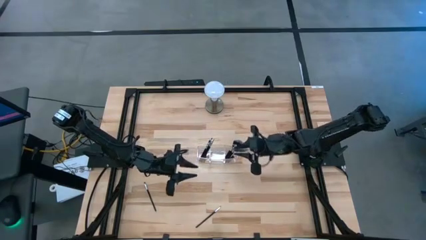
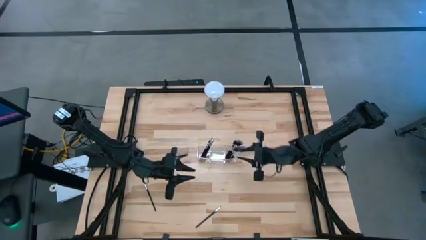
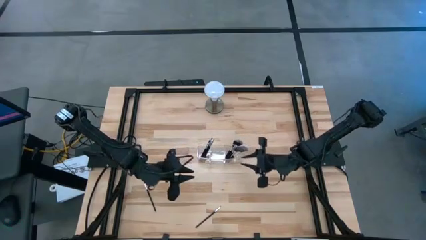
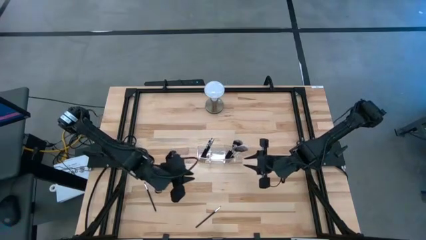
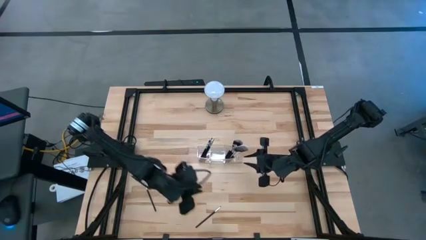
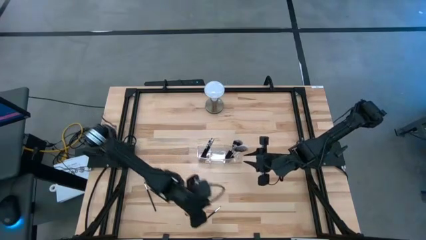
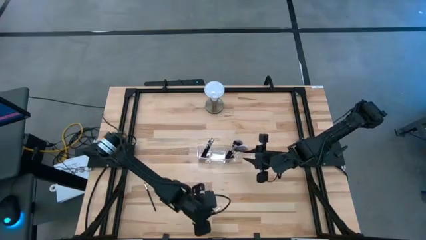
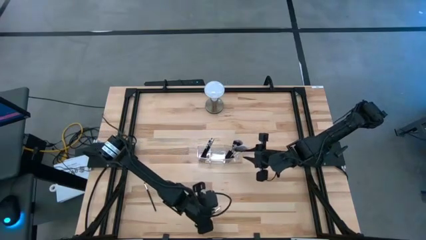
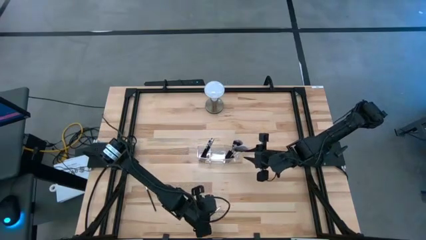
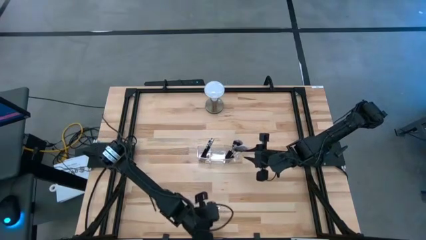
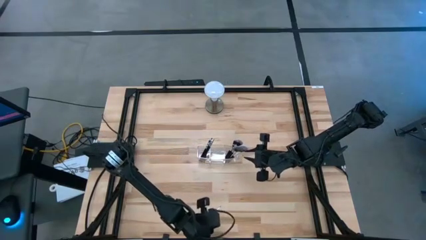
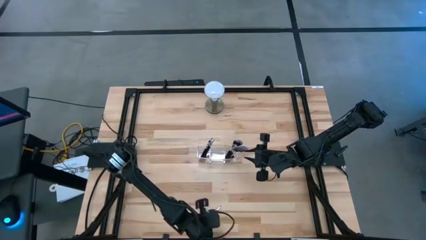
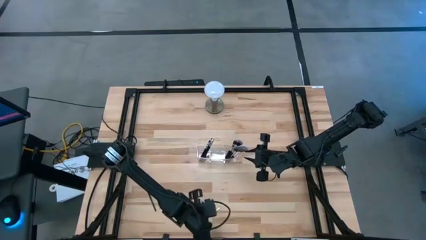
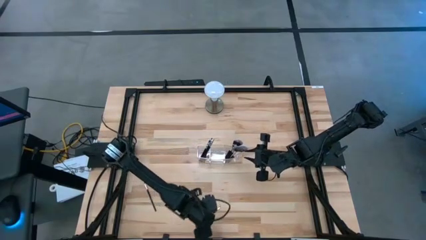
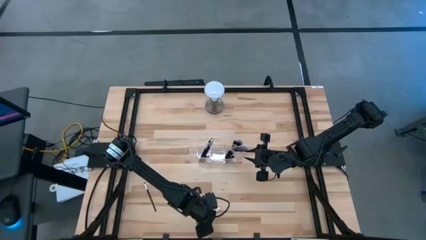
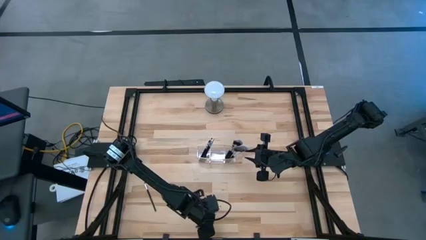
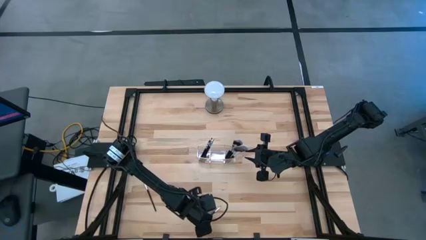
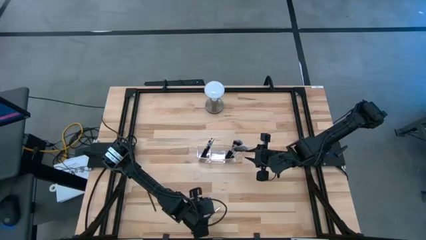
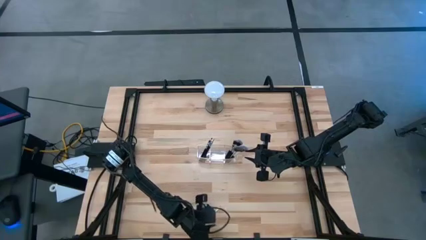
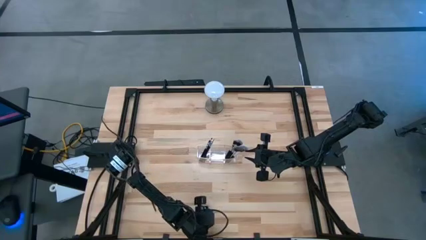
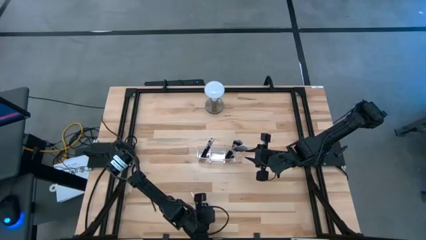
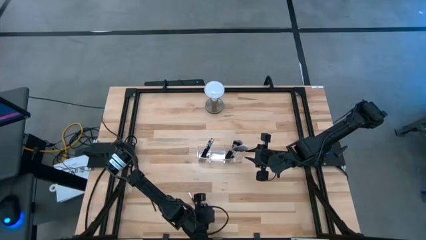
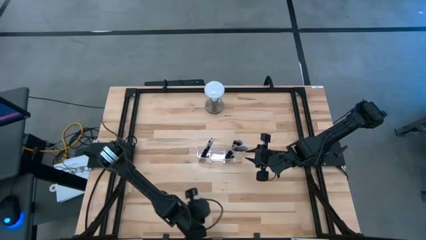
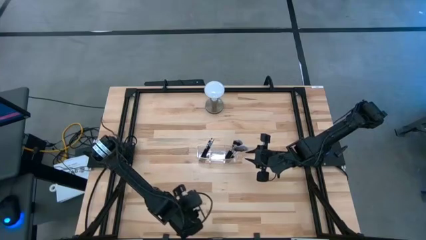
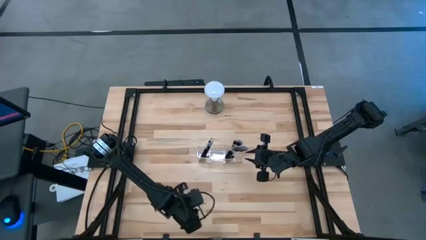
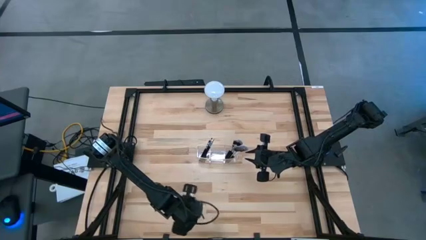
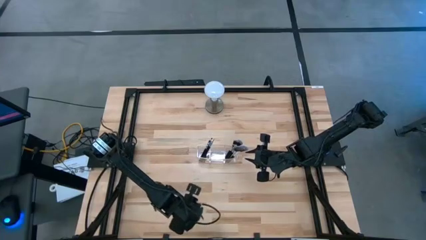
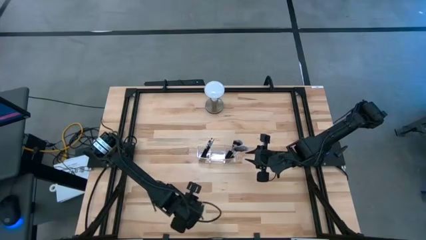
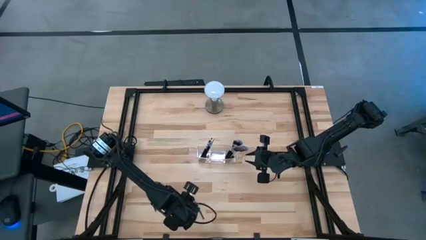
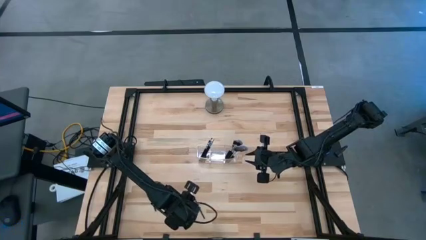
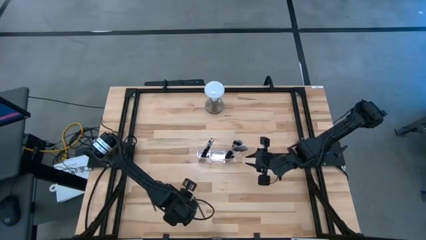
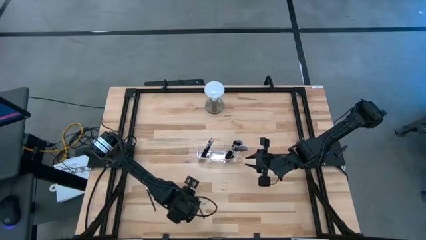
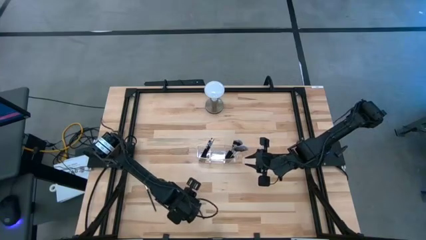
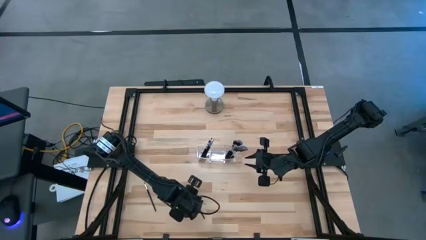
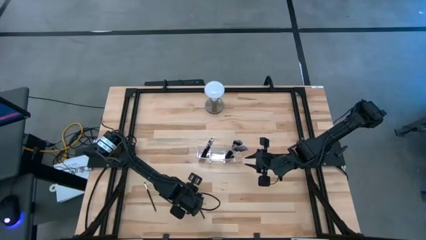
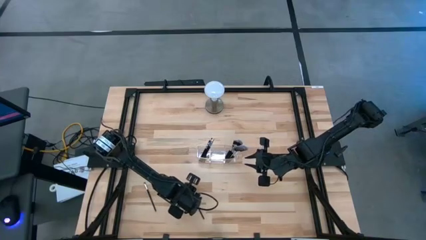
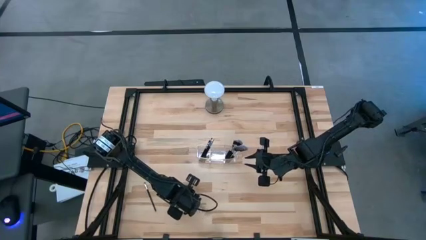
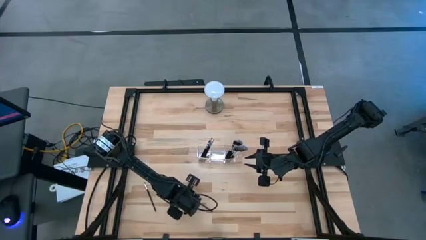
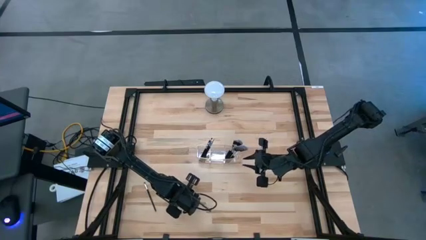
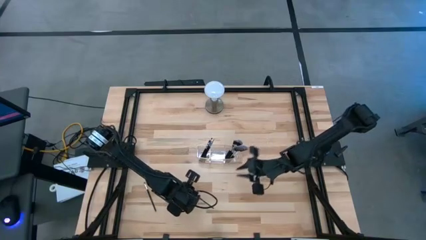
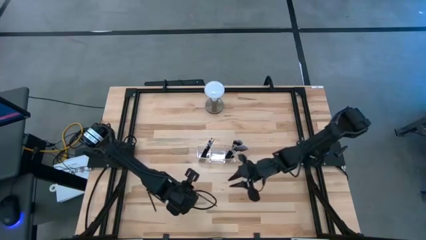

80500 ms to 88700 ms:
Task: Put items in baskets/containers
Put the black liner brush into the transparent organizer

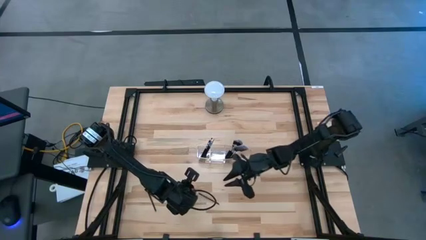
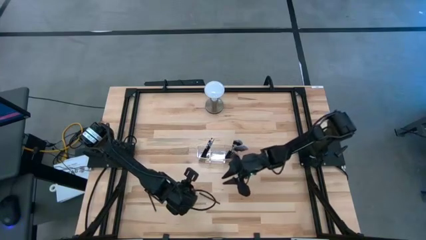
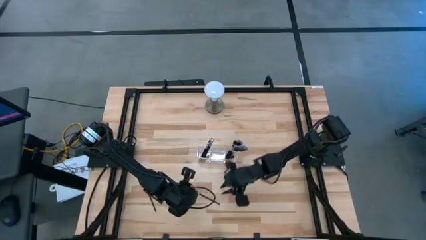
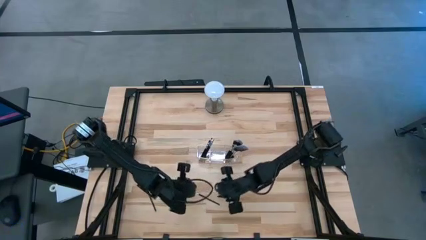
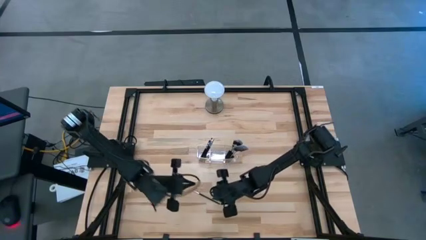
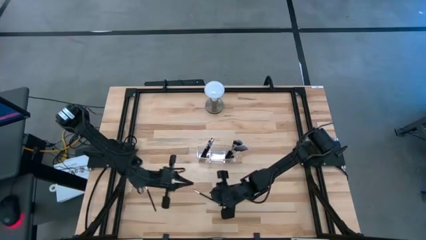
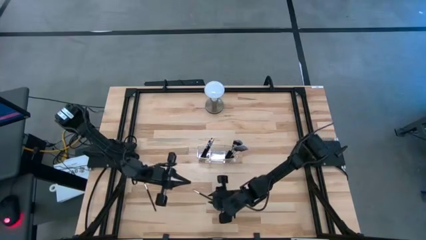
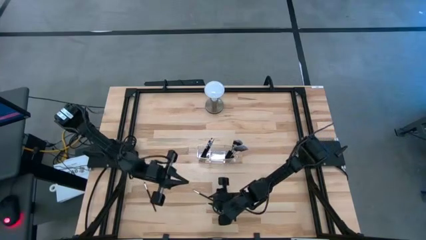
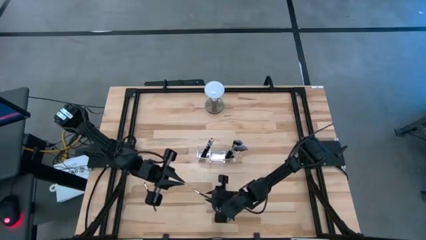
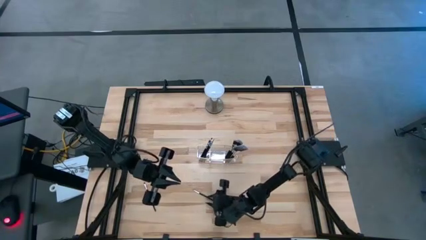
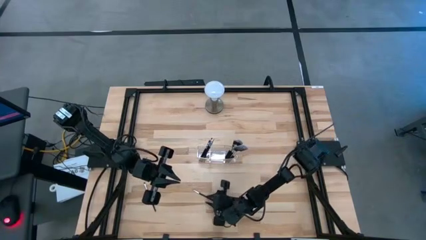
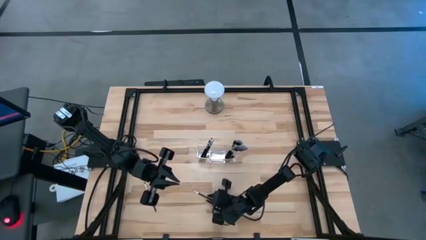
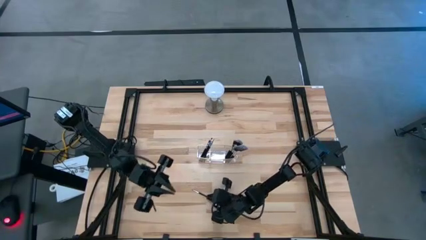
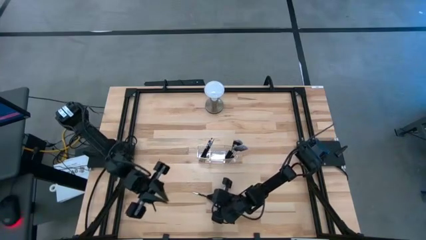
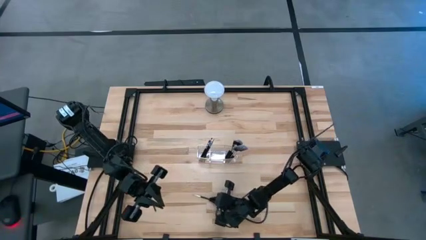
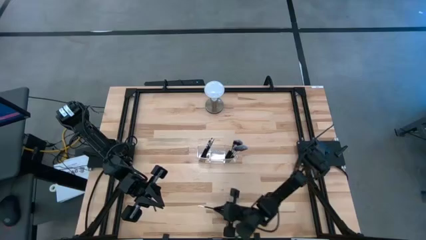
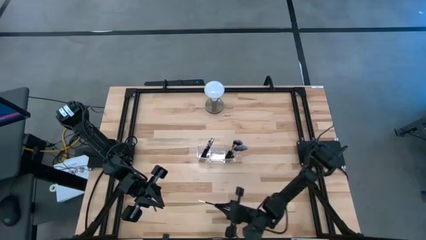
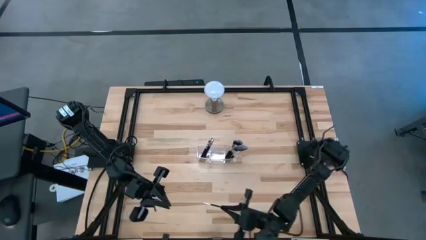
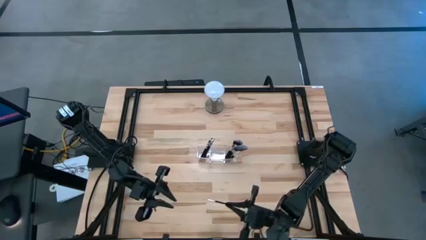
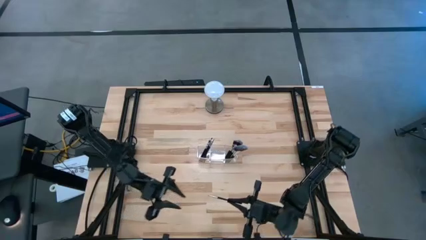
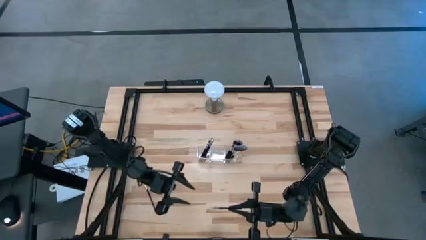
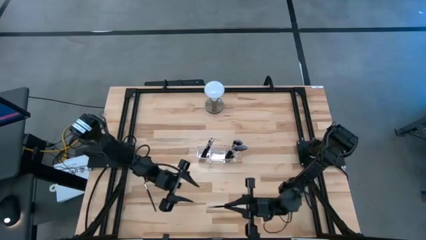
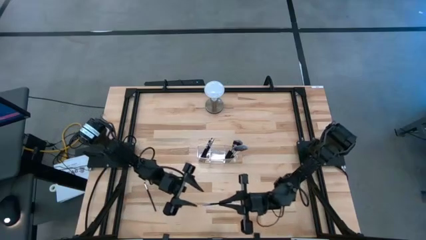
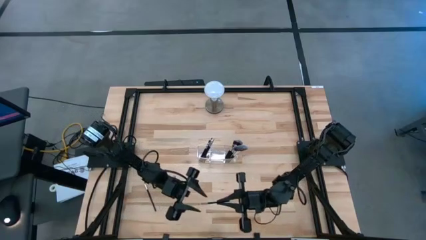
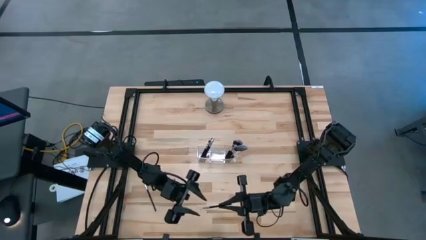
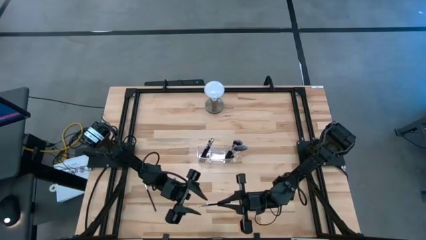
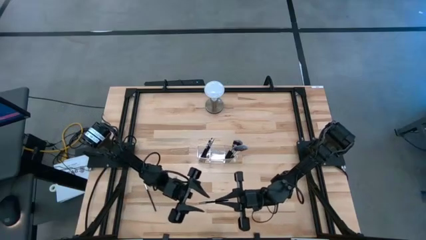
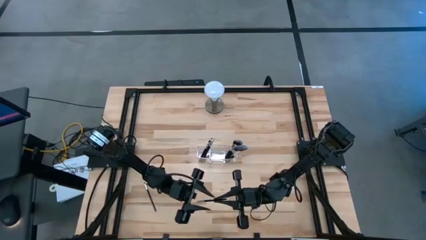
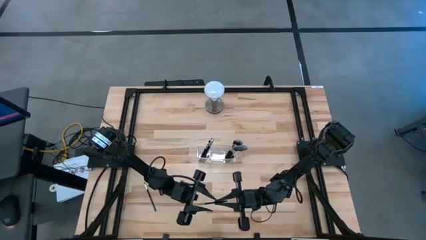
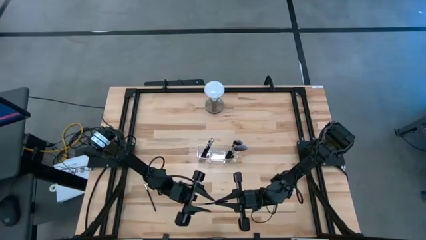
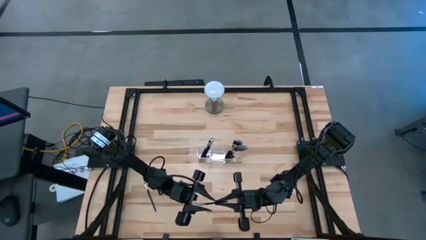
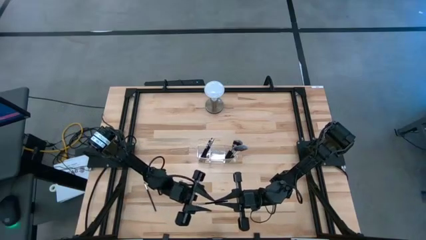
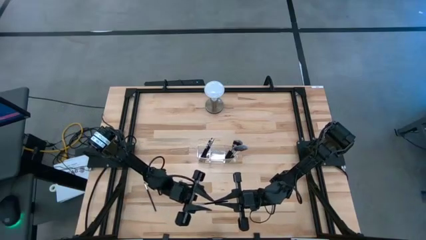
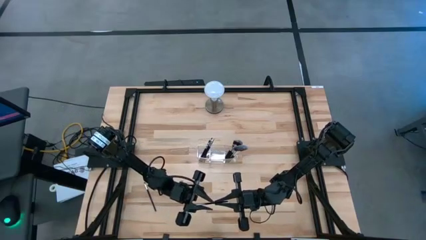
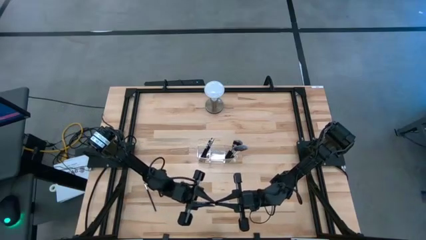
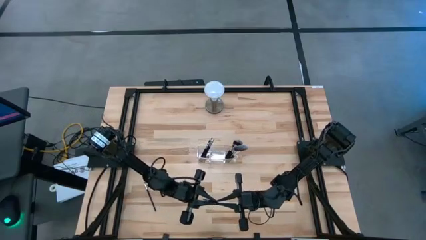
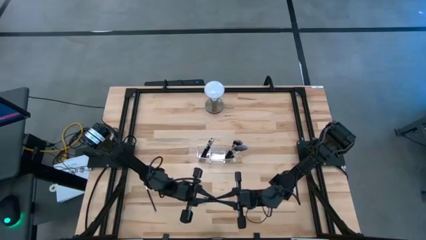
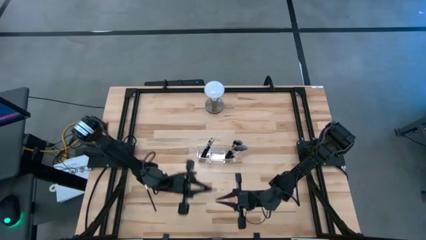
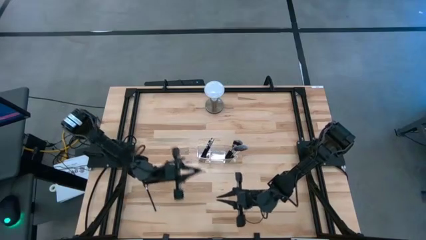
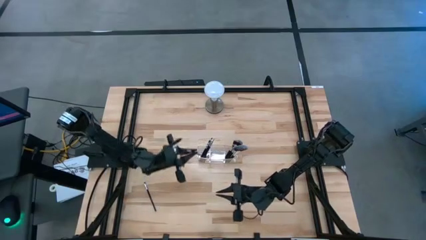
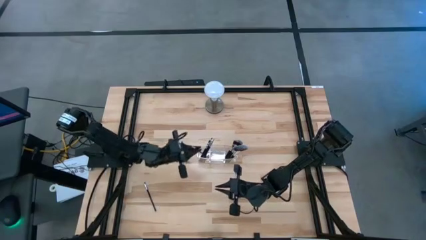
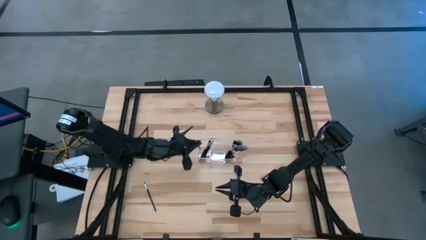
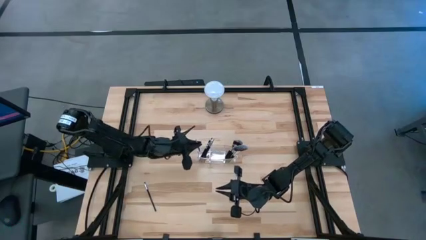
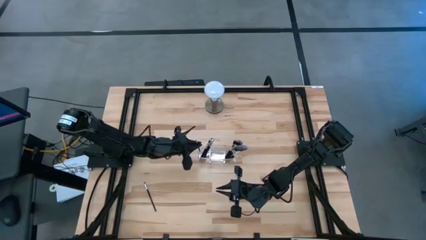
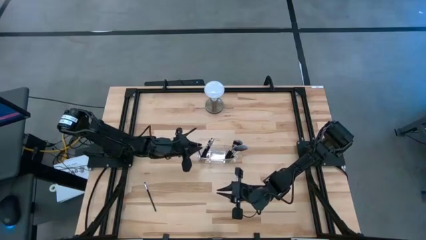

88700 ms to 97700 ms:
Put the black liner brush into the transparent organizer
